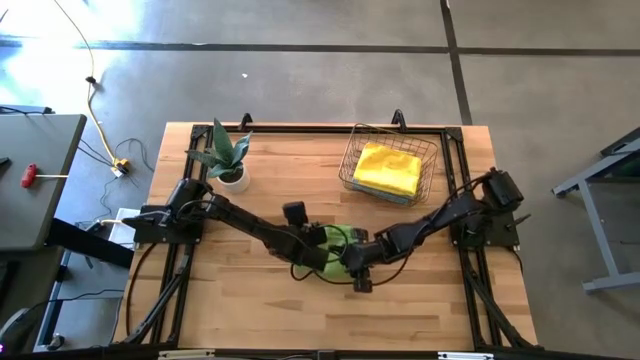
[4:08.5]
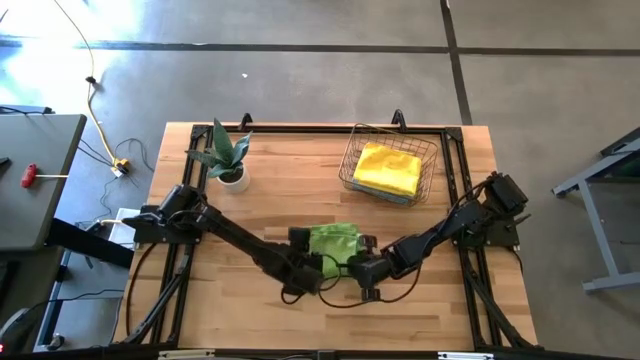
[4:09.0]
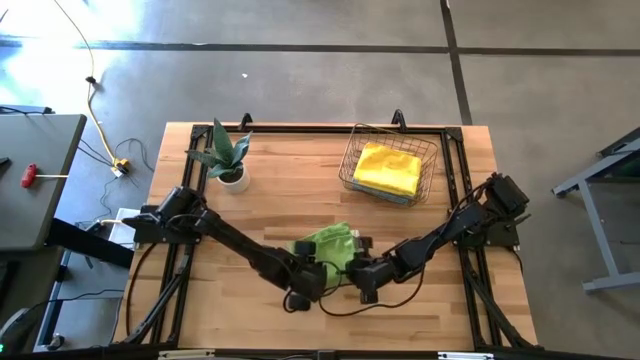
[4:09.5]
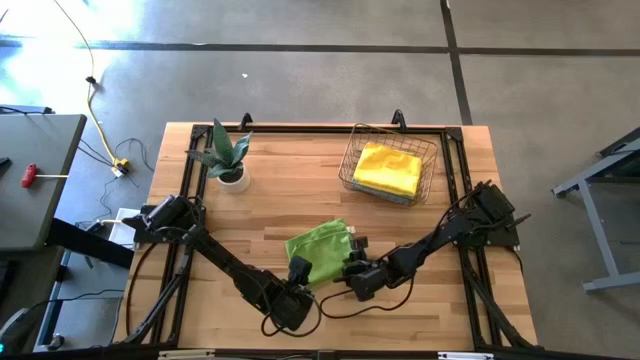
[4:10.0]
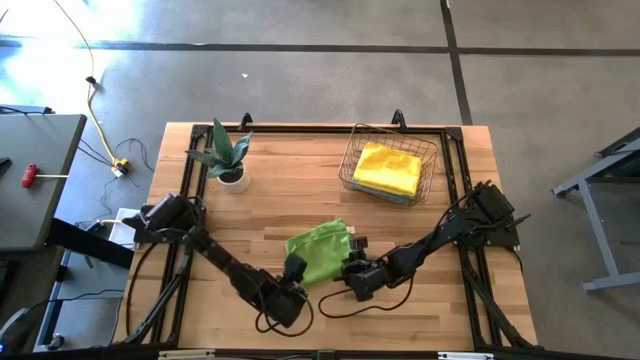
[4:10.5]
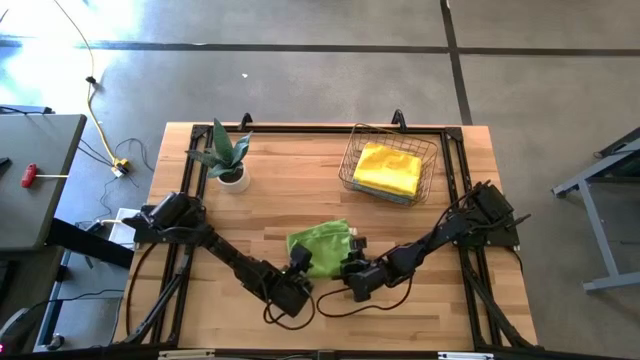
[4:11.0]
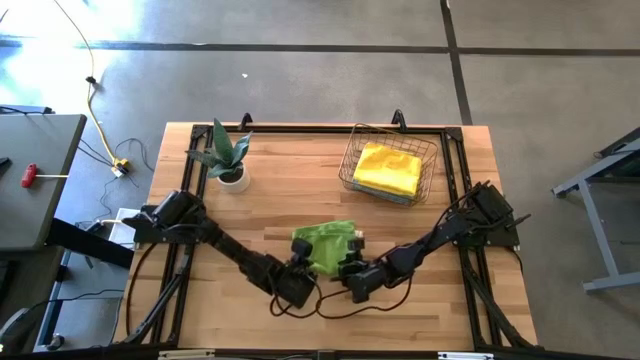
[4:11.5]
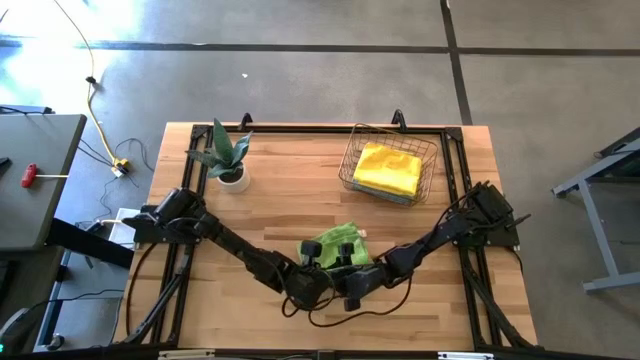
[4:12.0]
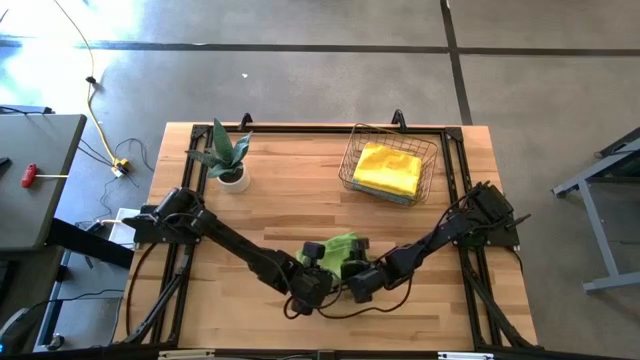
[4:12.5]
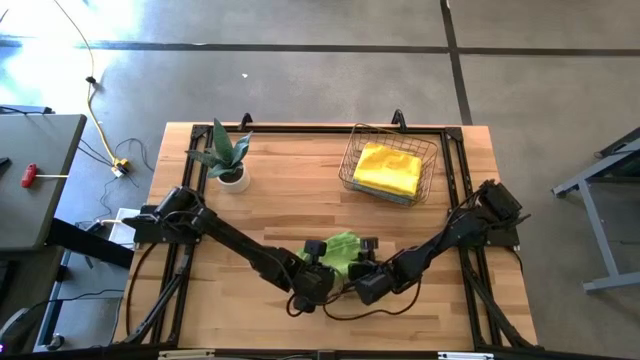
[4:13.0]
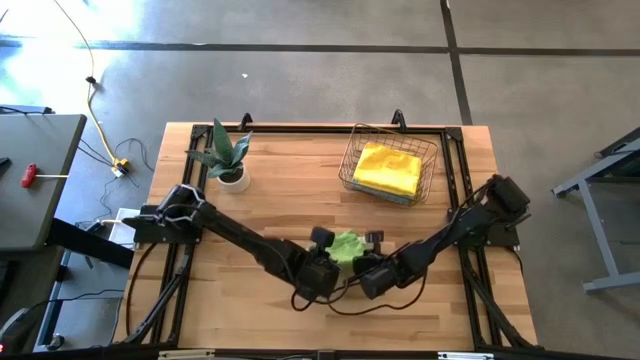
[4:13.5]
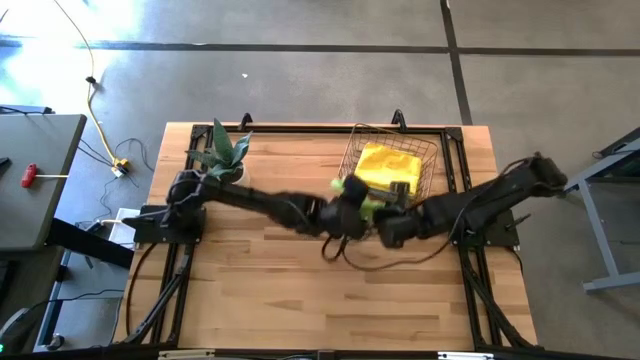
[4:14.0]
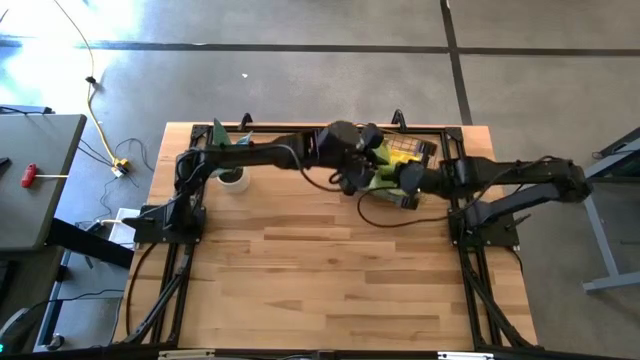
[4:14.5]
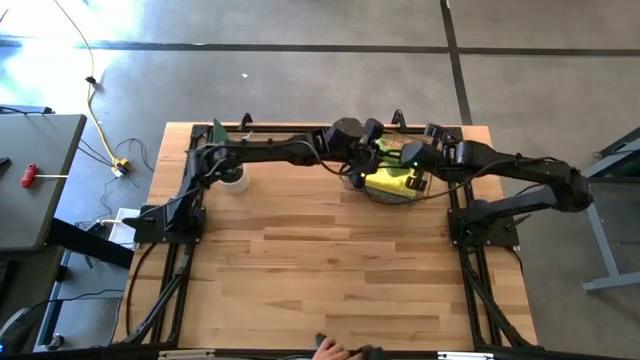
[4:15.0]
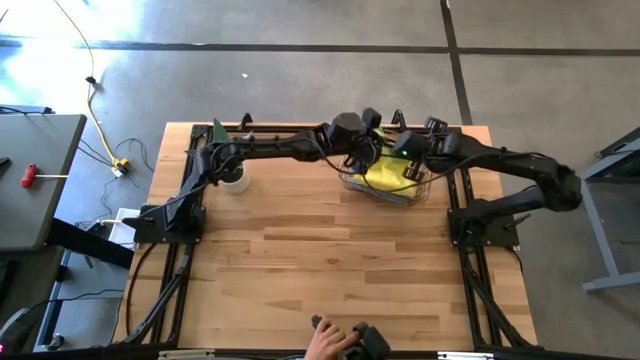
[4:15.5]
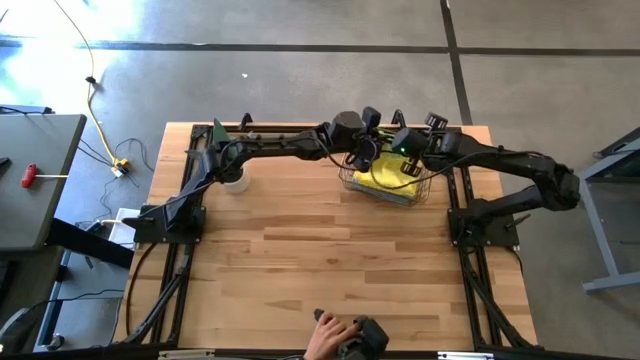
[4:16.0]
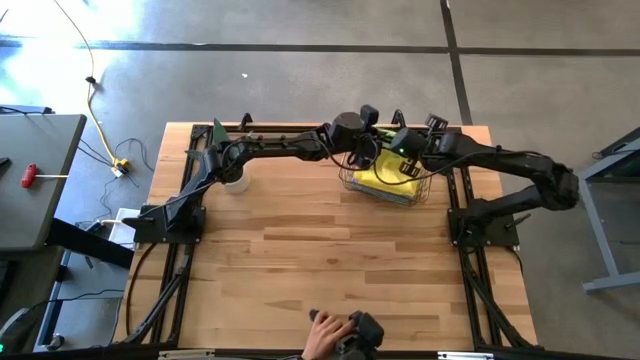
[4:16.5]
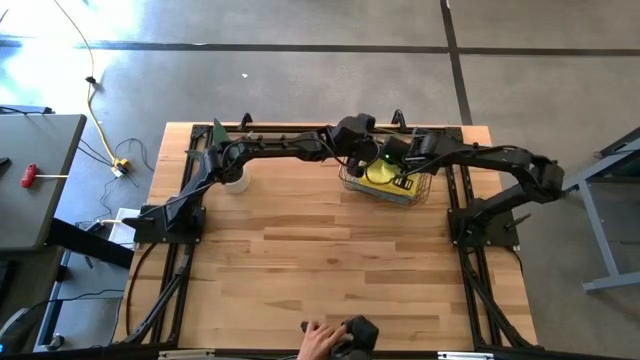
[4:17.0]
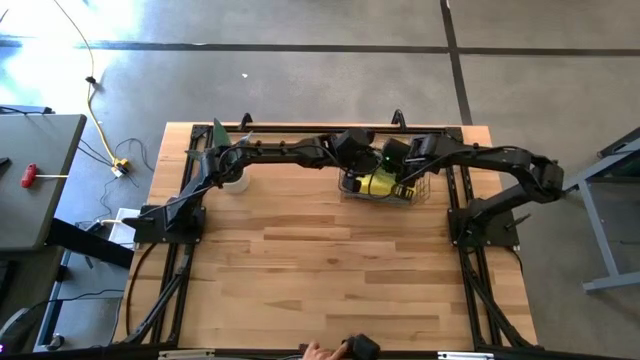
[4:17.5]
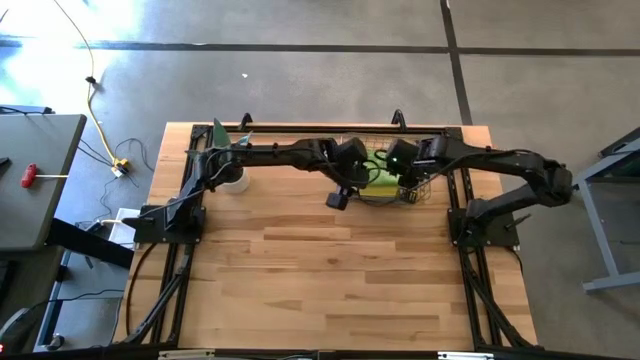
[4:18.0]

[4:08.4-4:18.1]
Task: Fold microfiber towels
Put the green microfiber towel into the wire basket

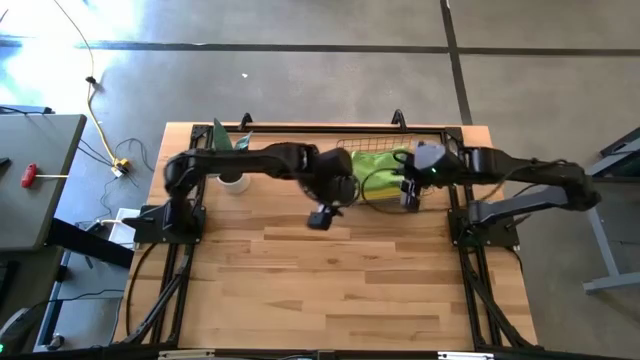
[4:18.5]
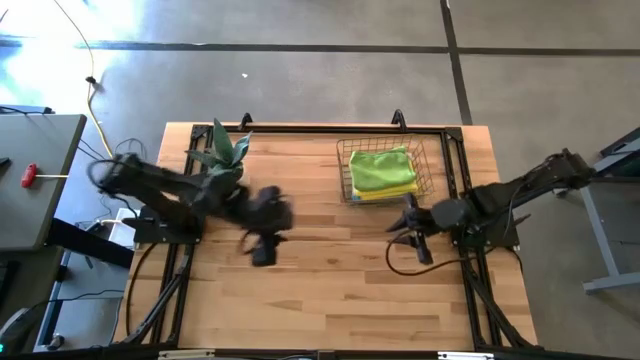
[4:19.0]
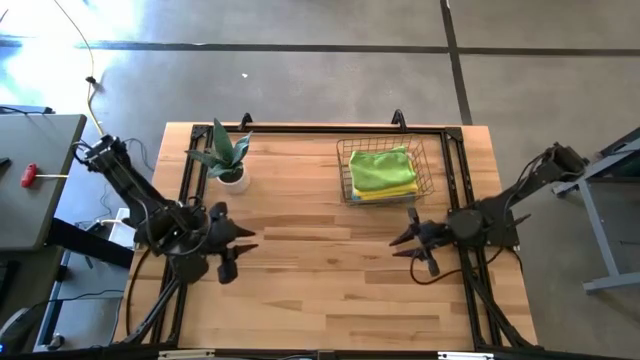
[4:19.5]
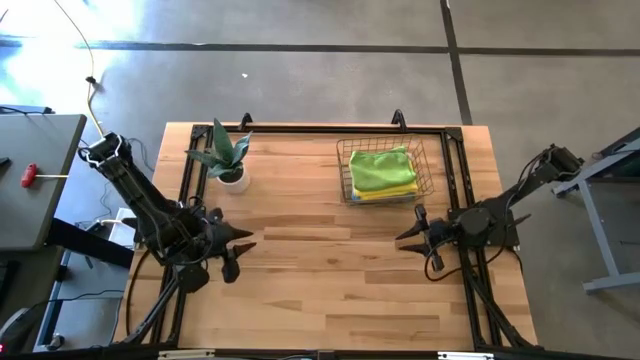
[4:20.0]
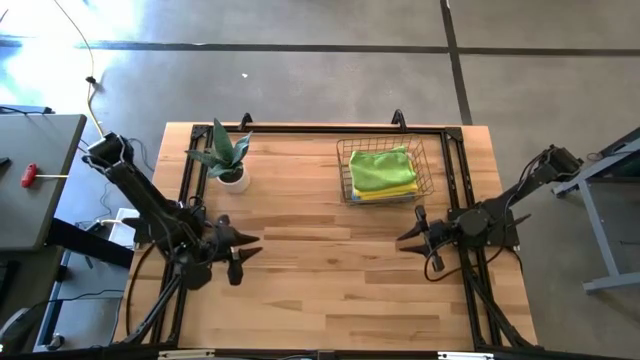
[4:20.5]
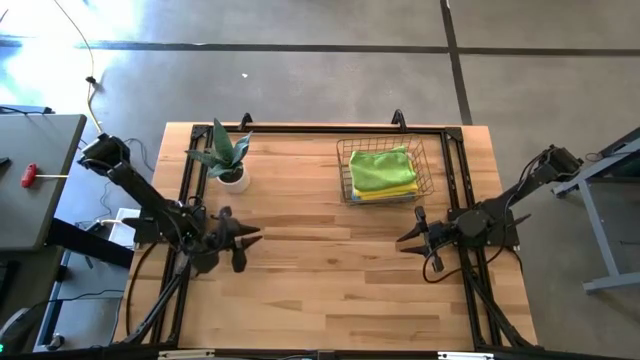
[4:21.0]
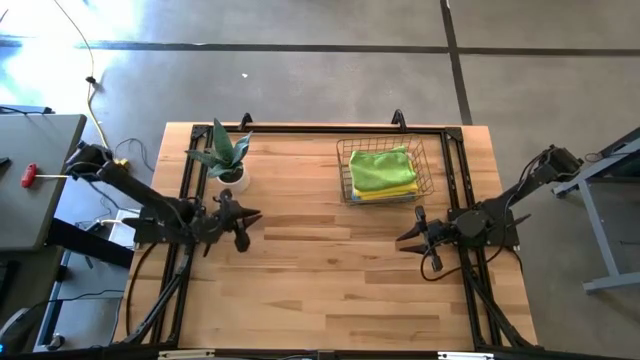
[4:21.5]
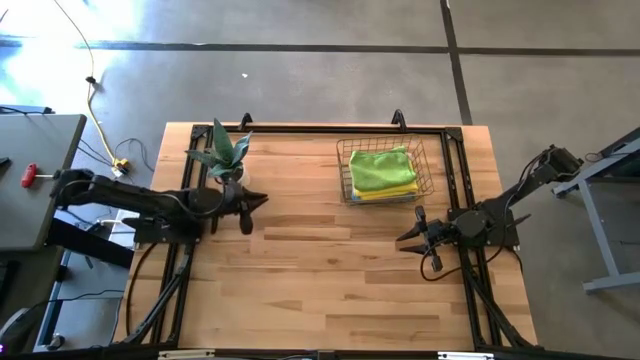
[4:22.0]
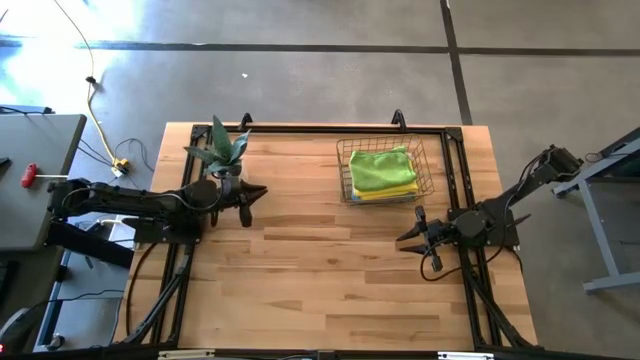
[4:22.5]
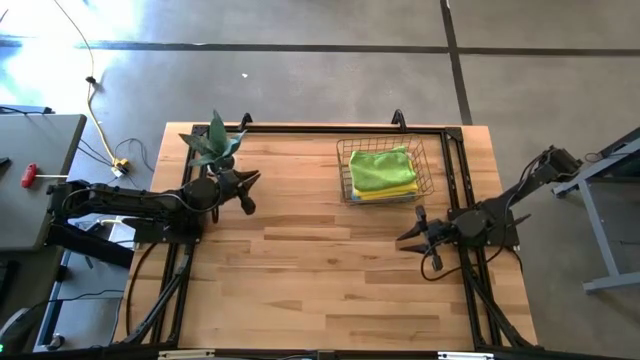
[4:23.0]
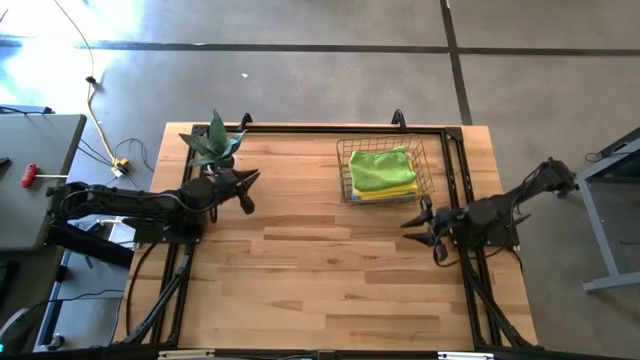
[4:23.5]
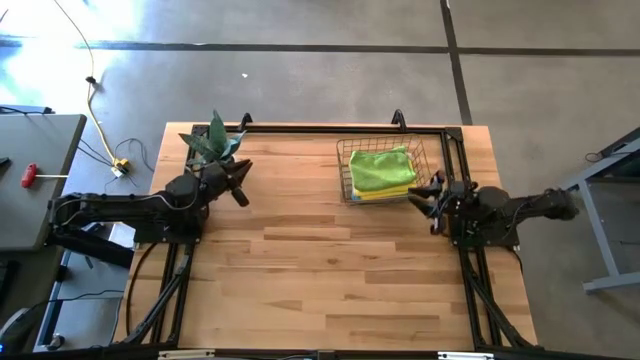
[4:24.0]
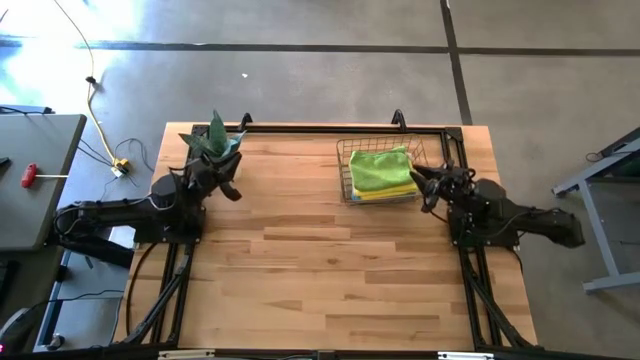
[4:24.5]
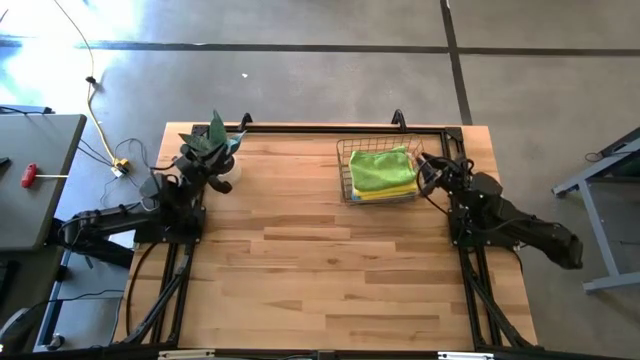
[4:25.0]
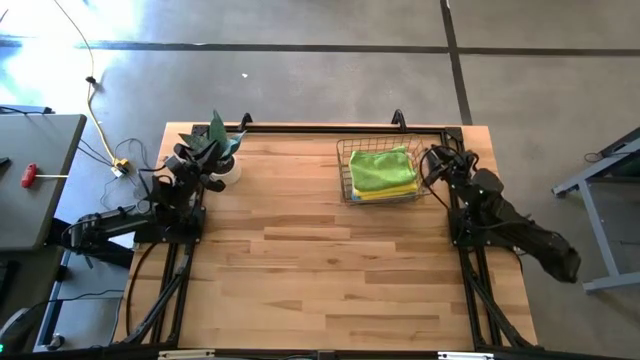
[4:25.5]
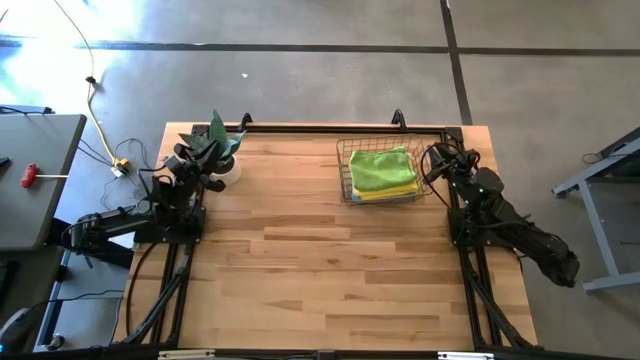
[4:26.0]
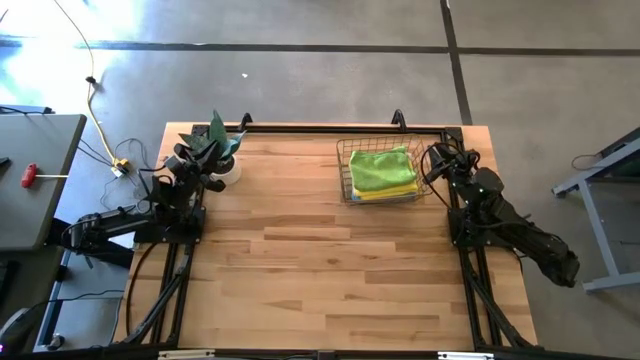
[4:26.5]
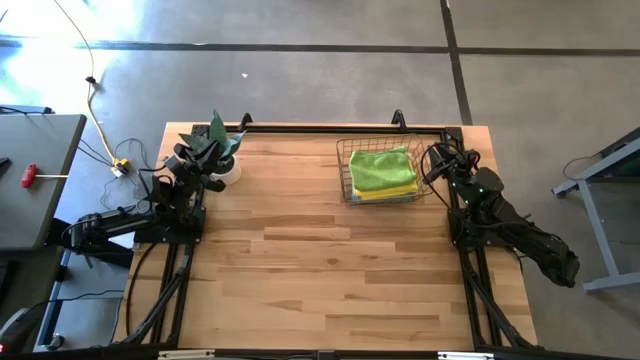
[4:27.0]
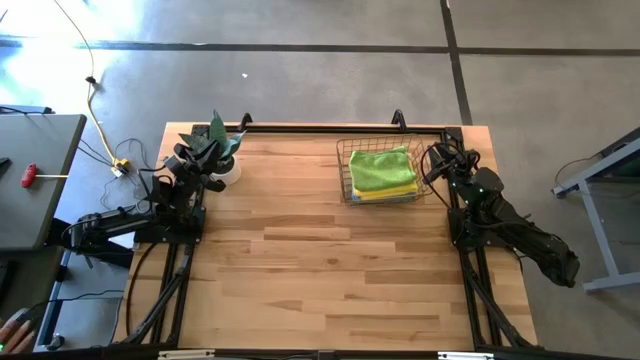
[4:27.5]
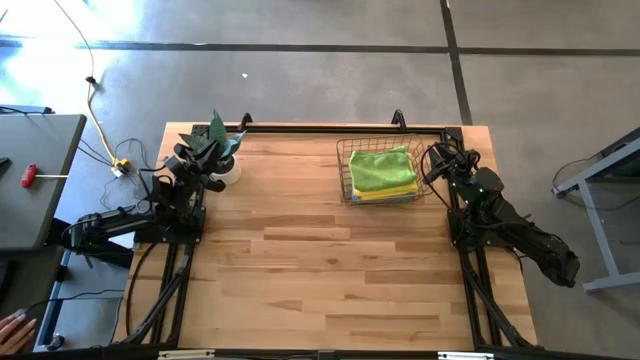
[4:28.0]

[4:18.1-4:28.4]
Return to Home Position
